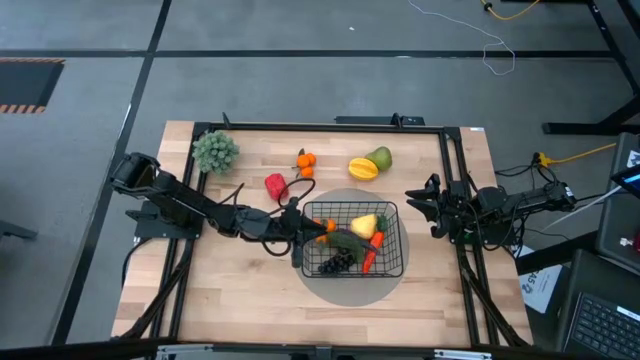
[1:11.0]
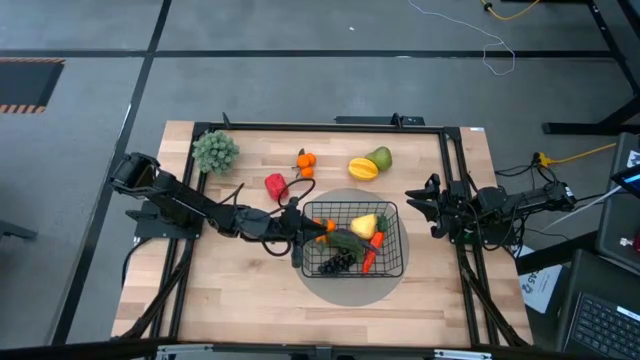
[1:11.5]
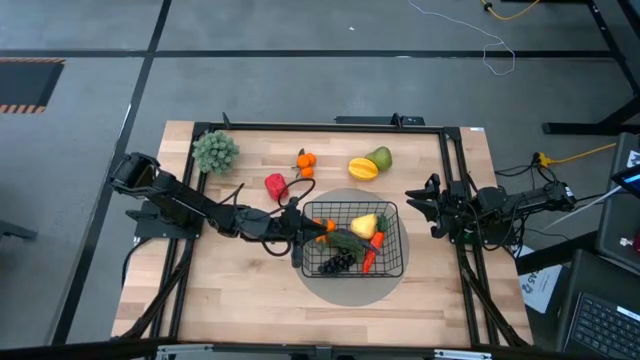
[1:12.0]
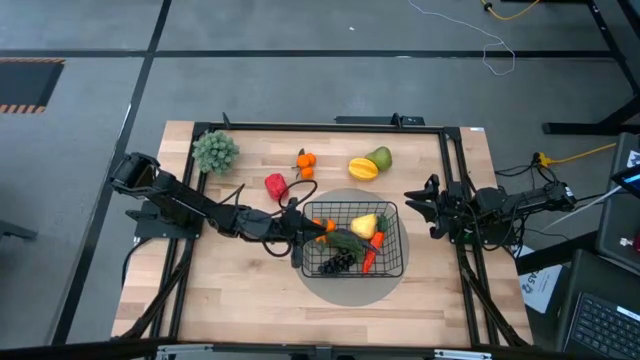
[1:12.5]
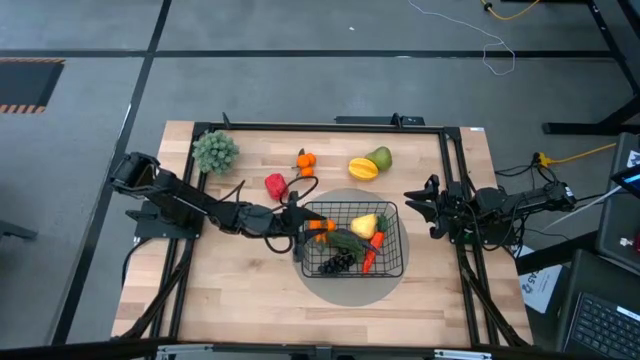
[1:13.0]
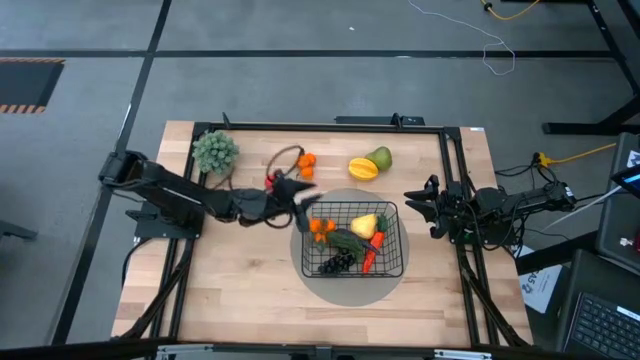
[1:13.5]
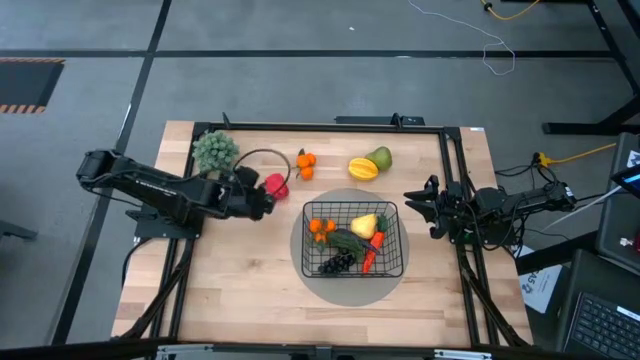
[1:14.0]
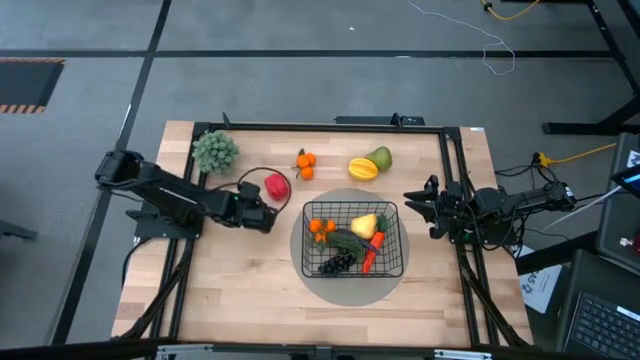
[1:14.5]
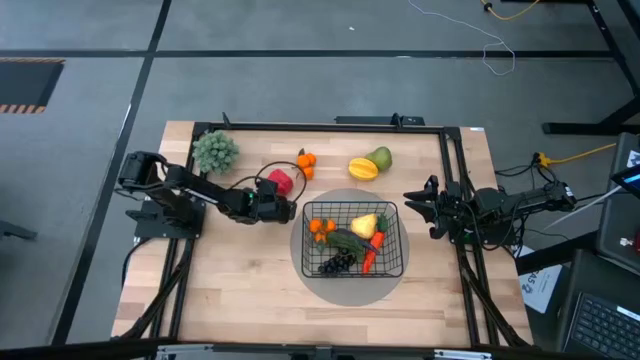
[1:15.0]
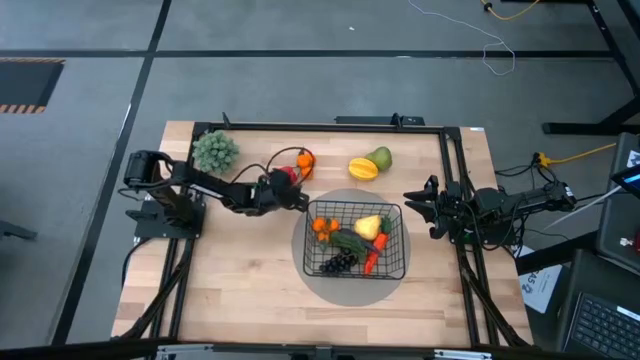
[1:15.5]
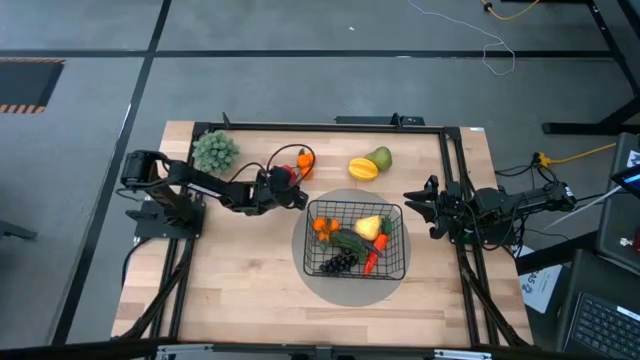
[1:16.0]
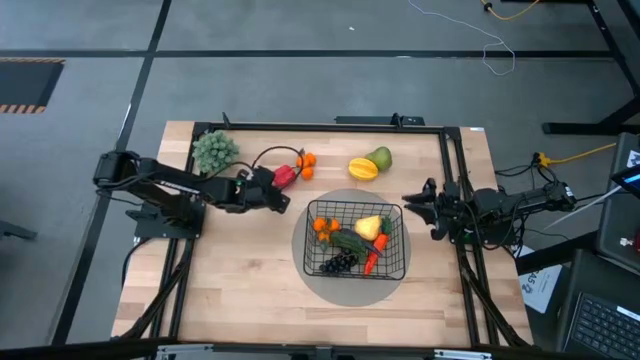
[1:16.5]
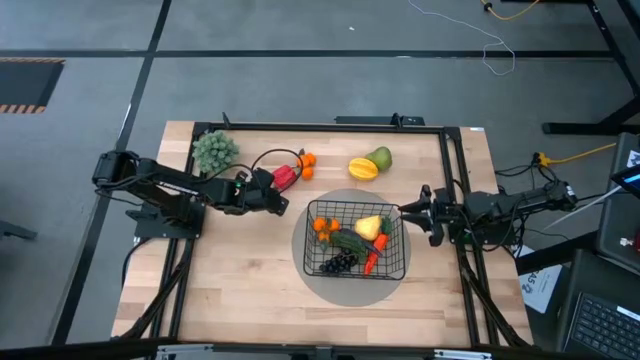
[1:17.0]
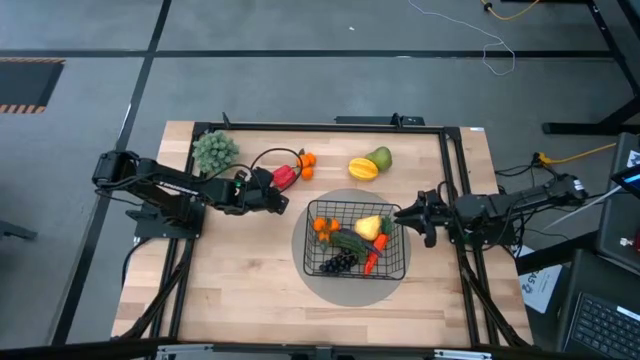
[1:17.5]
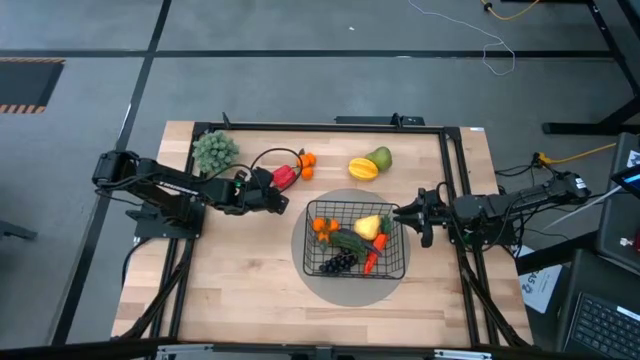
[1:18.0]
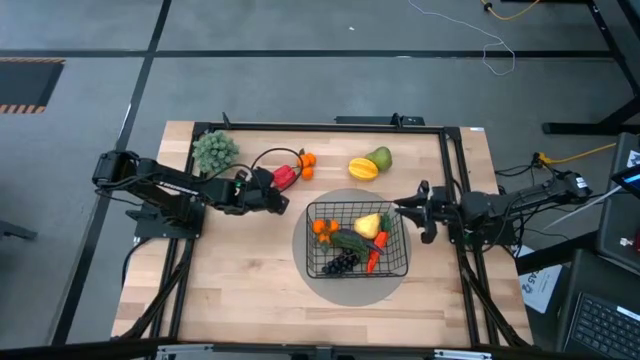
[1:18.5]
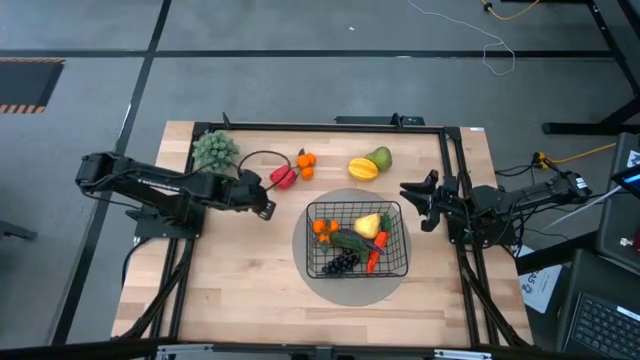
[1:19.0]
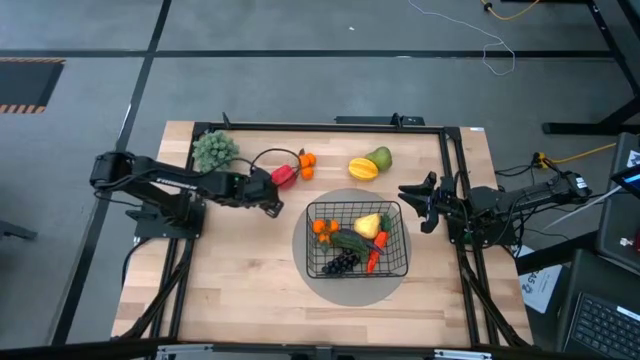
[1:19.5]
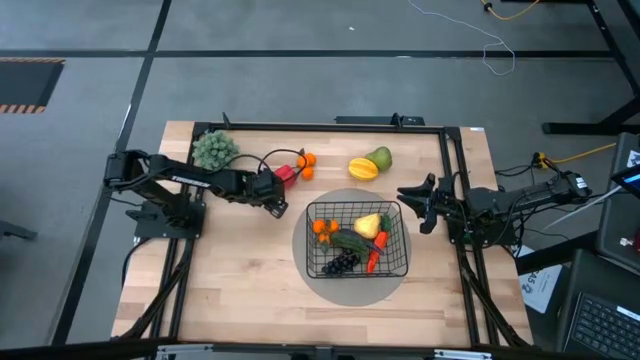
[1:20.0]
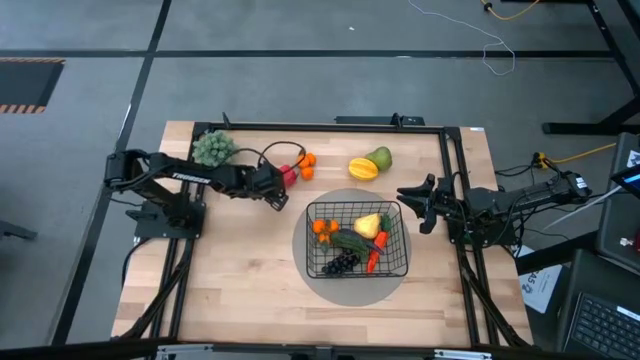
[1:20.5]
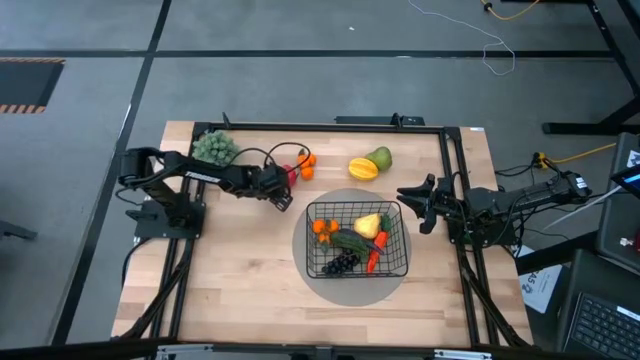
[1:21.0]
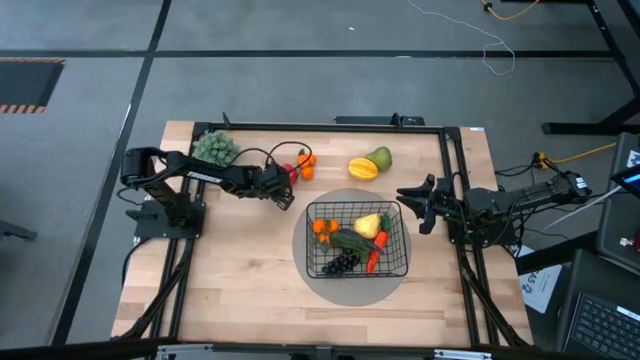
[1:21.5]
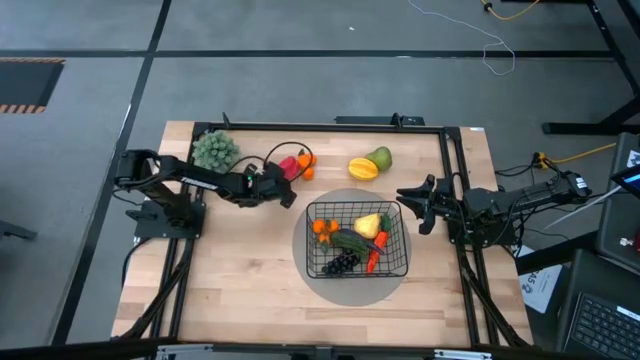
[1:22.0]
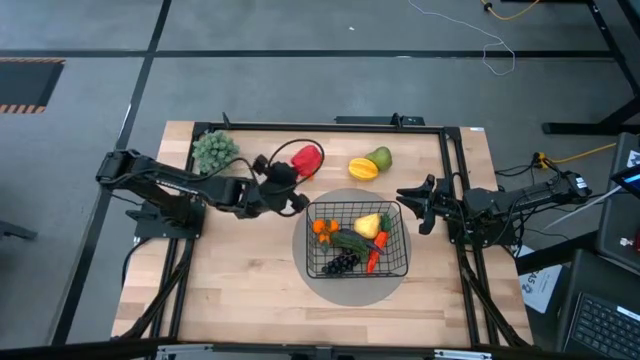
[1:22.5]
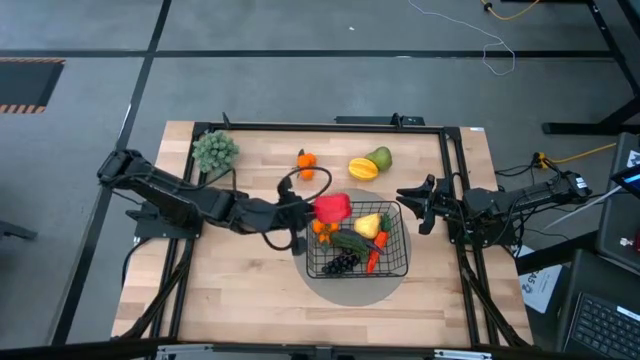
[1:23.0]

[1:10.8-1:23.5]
Task: Build produce basket
Put the red bell pepper into the black wire basket

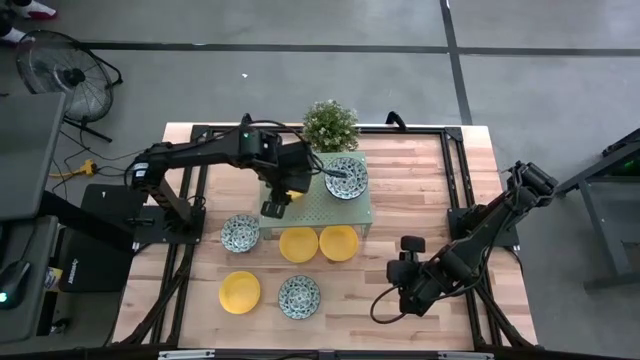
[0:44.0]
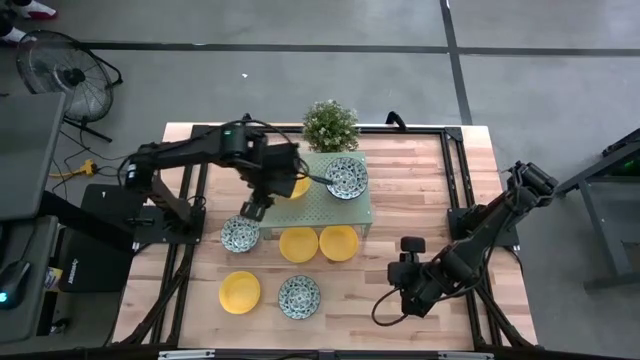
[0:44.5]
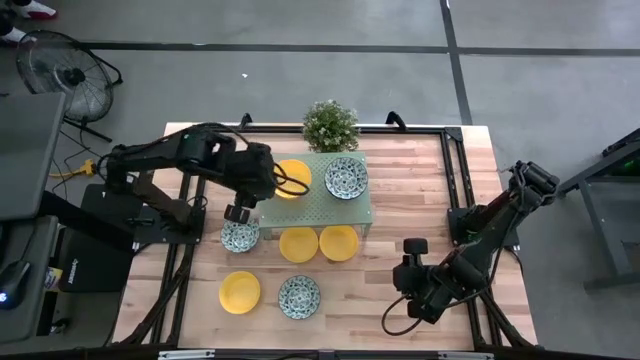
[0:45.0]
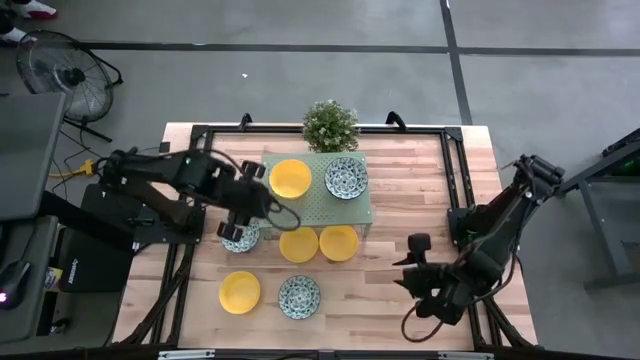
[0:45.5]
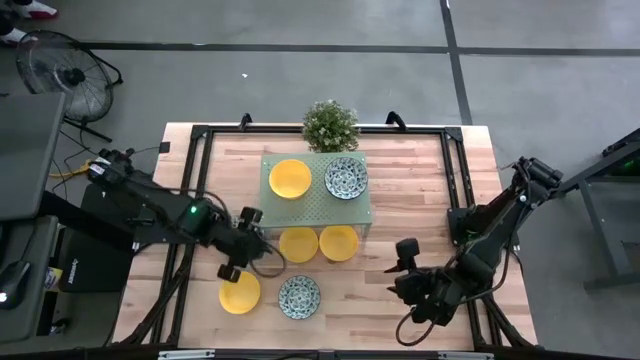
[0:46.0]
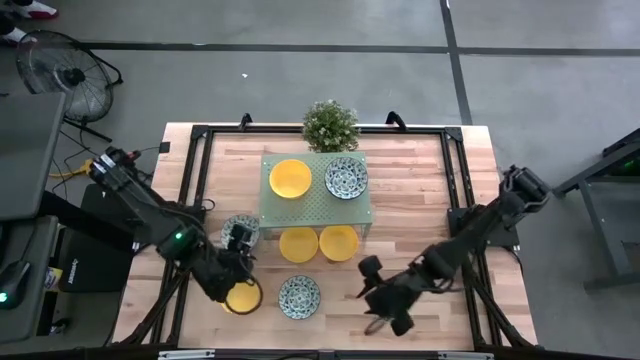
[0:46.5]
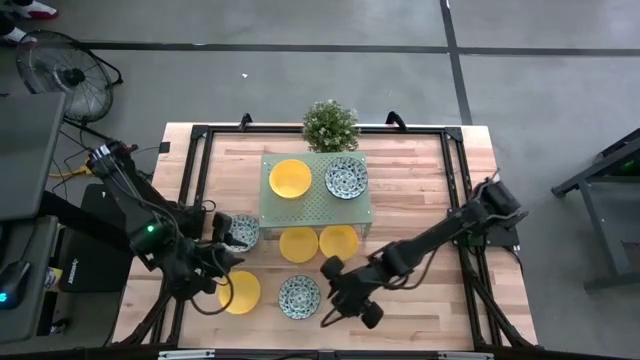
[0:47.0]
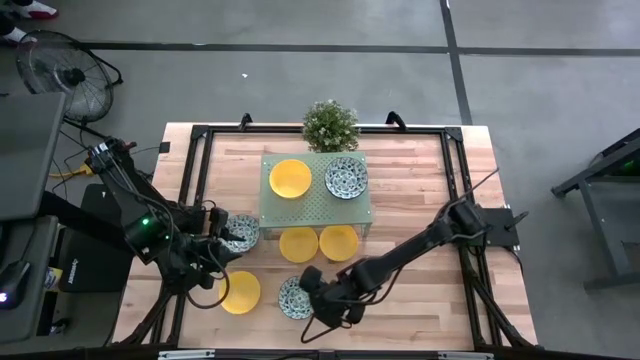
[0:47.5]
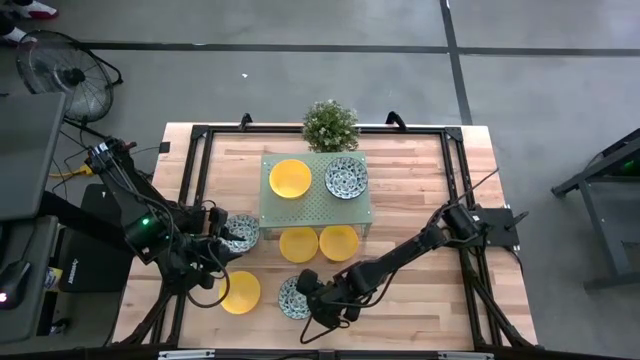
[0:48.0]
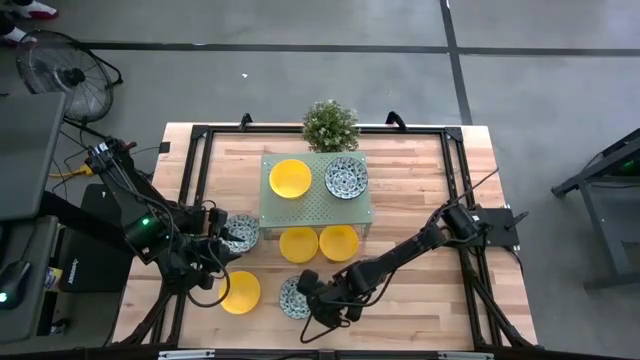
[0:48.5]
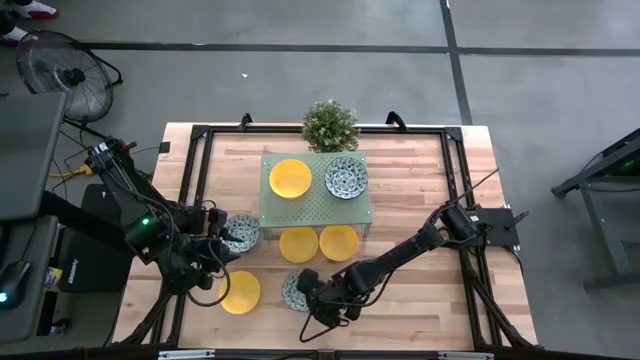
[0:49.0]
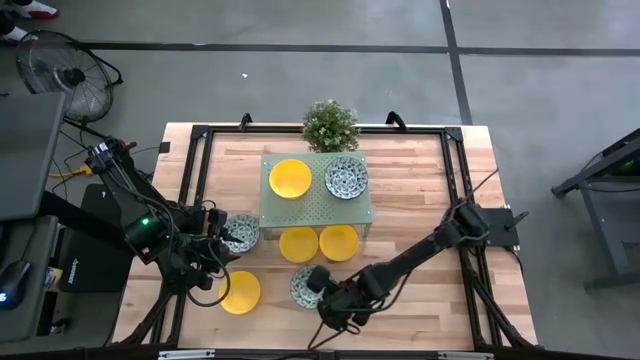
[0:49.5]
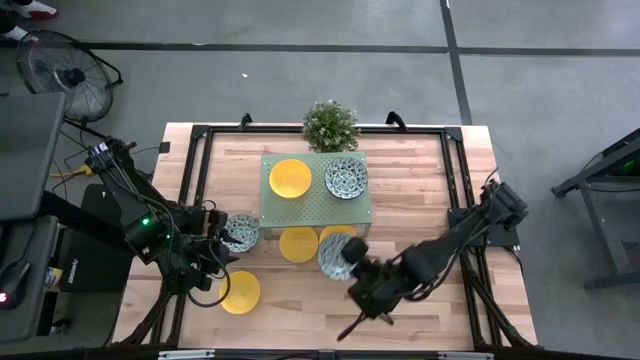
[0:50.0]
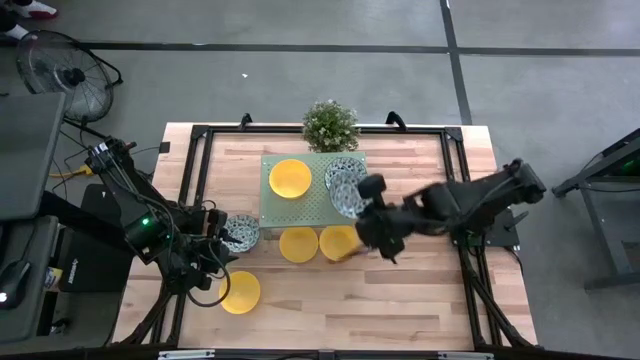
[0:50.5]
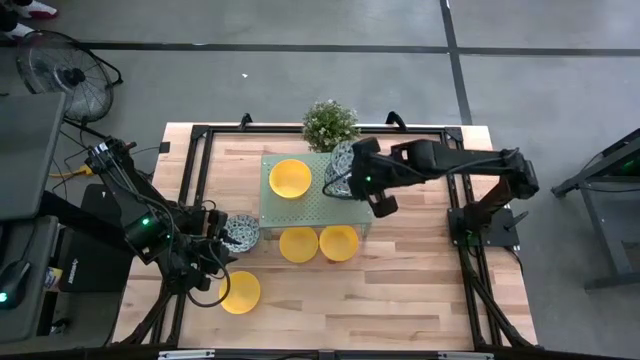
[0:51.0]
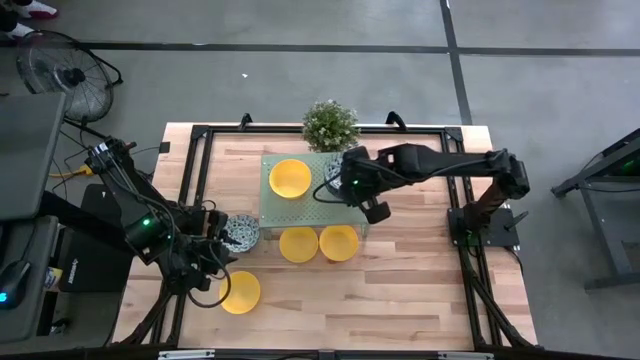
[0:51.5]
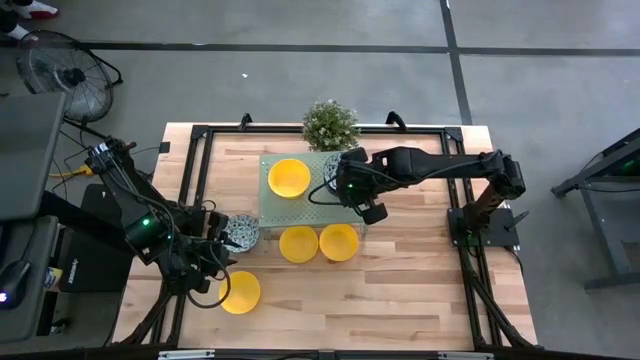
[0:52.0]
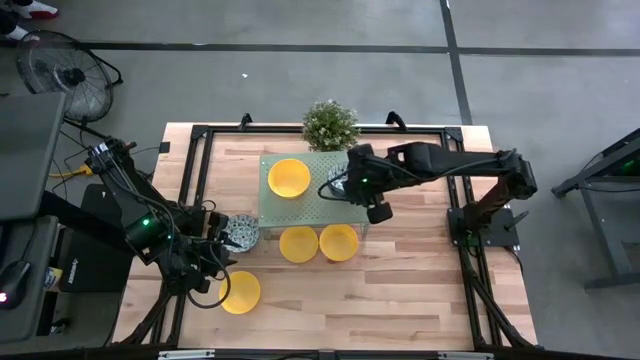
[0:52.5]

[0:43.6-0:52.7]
Task: Pick & Place Mini bowls
Stack the blue patterned bowl on top of the blue patterned bowl on the shelf
